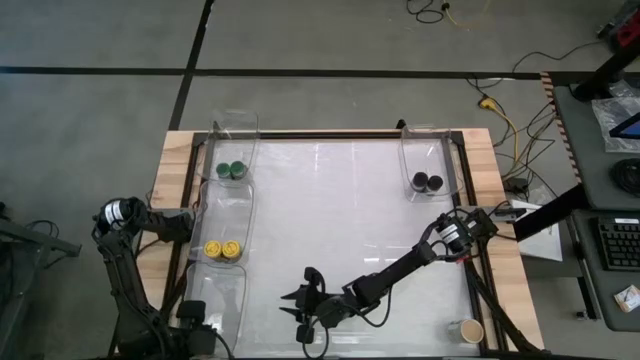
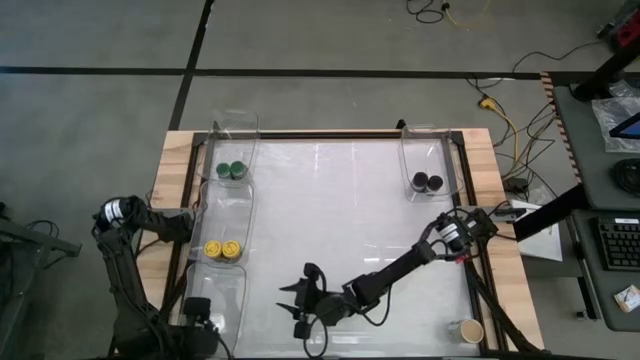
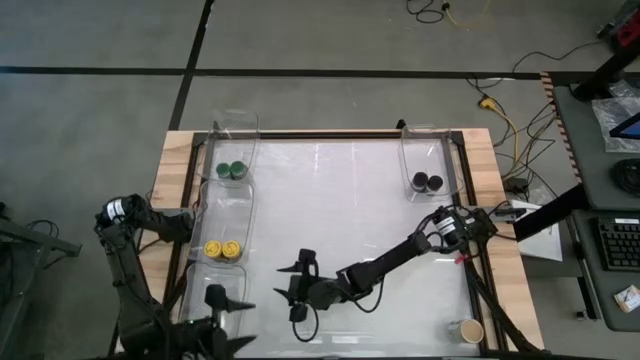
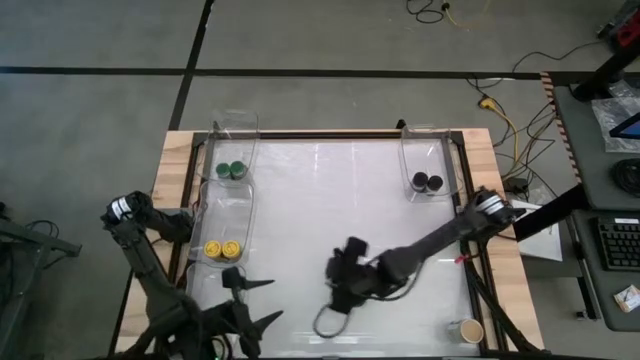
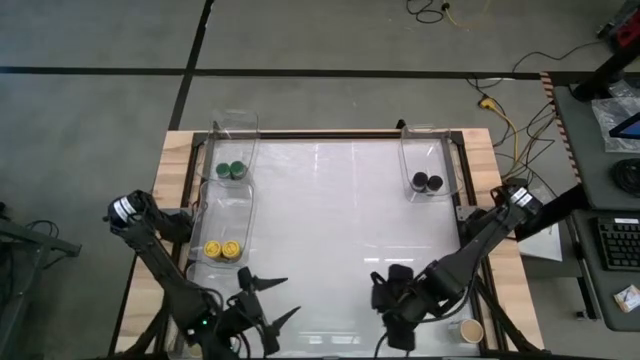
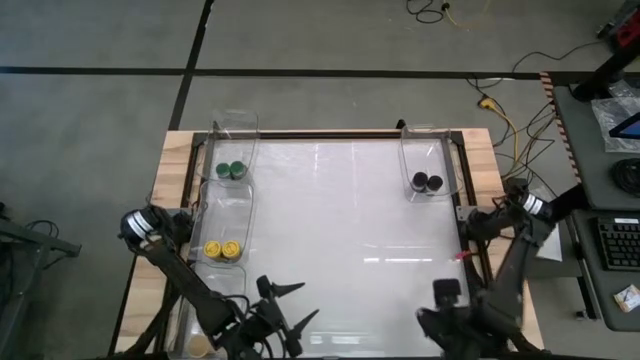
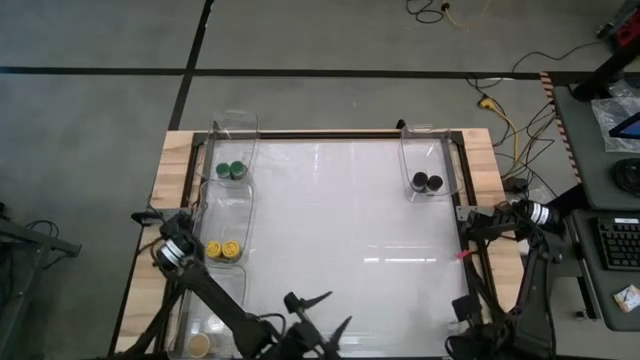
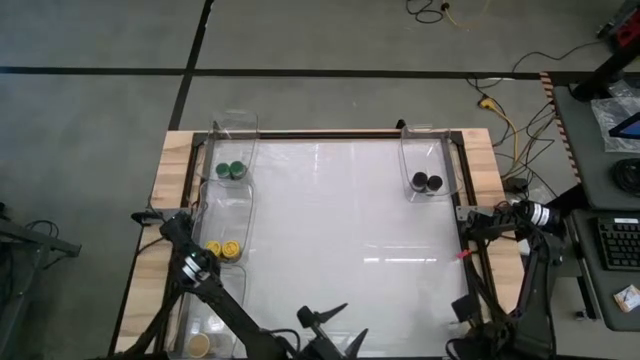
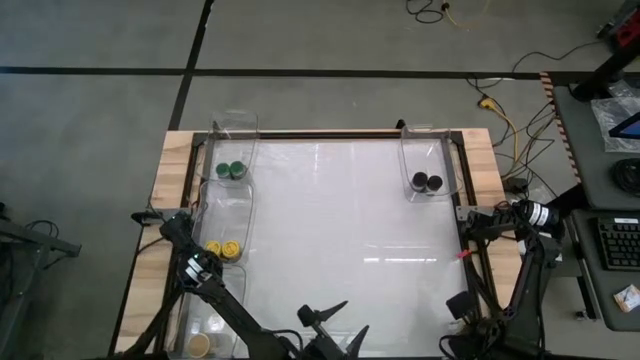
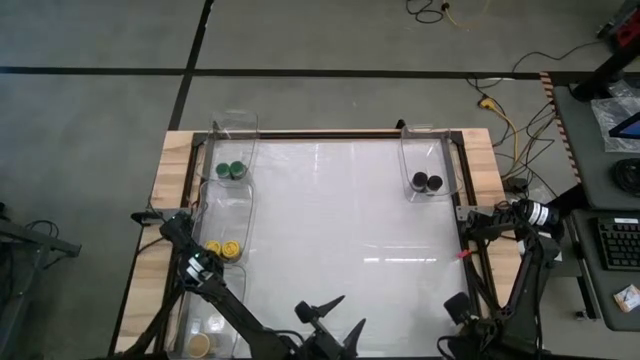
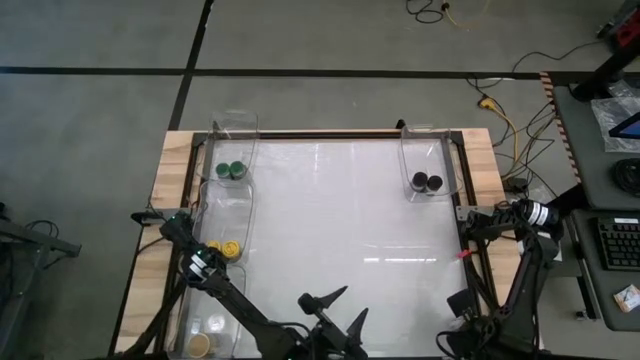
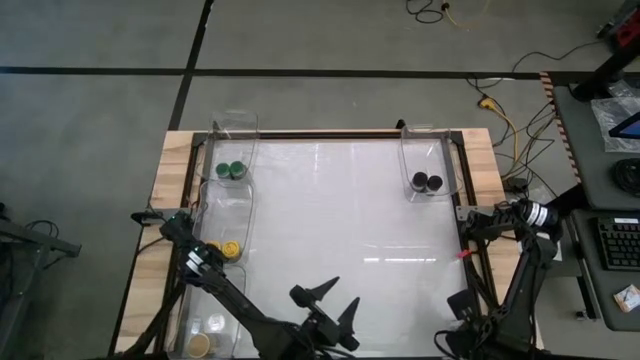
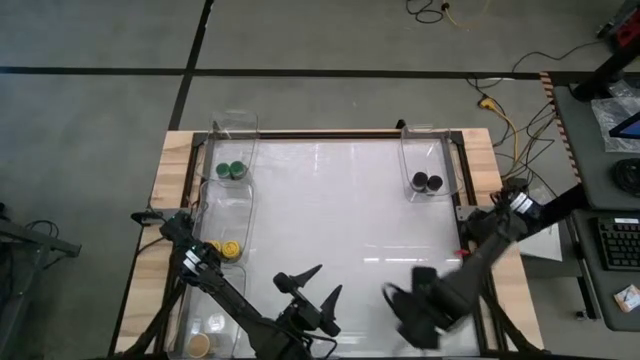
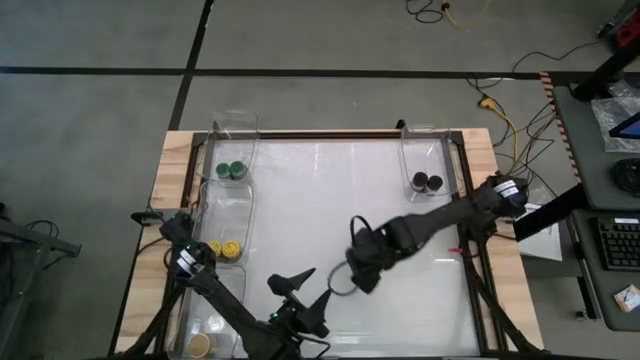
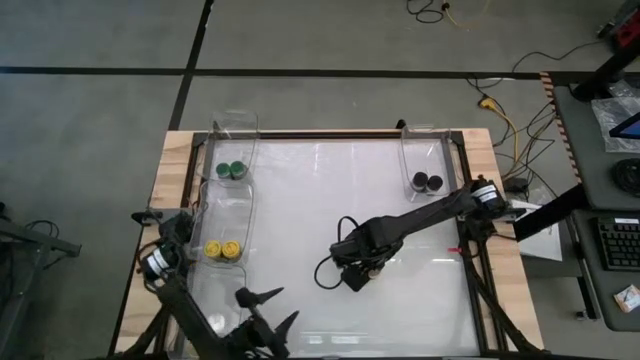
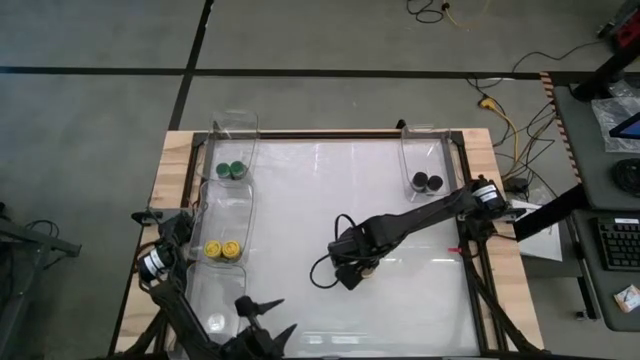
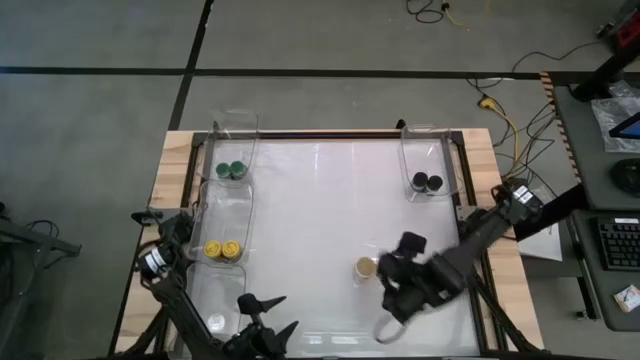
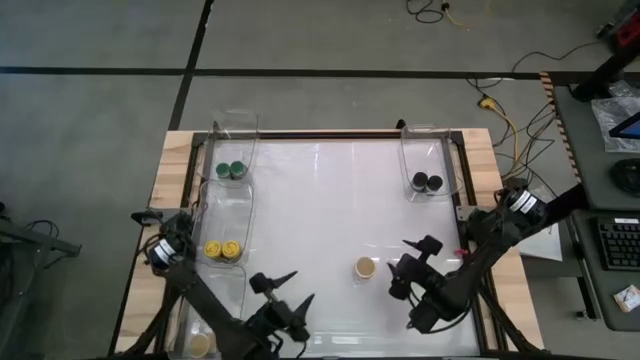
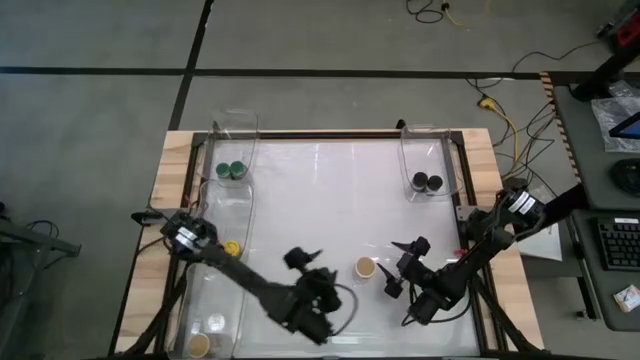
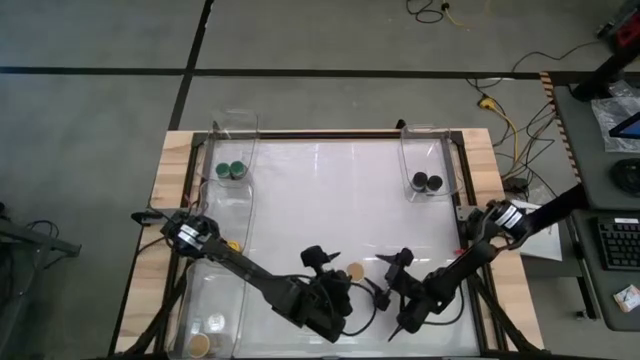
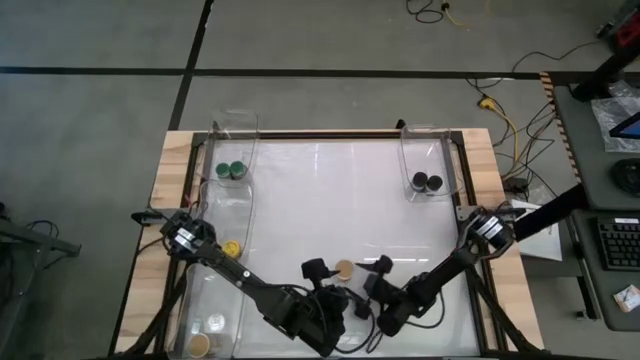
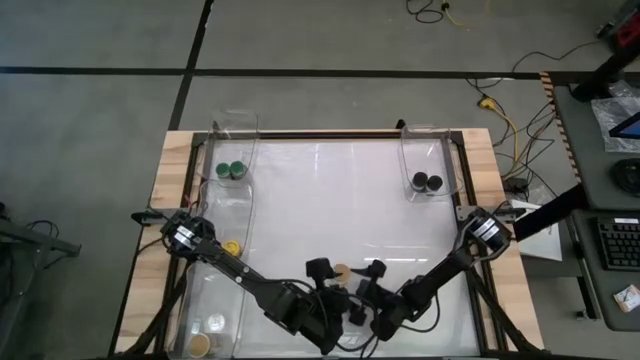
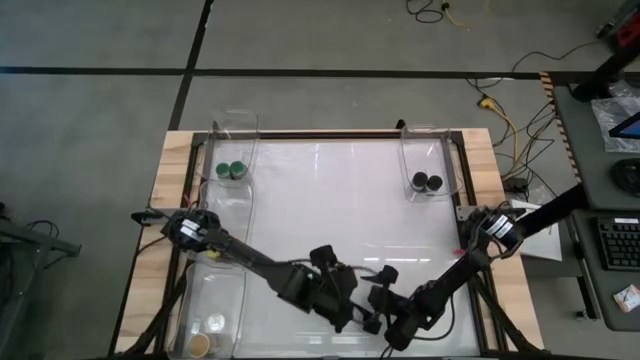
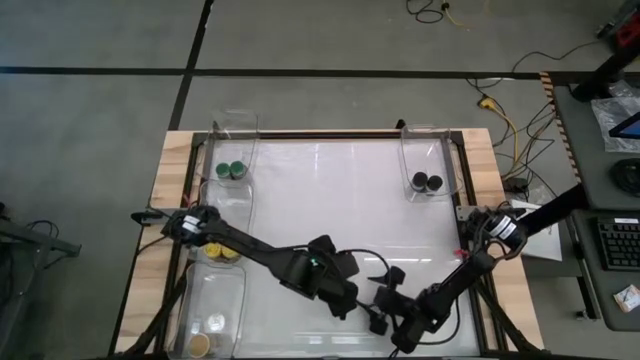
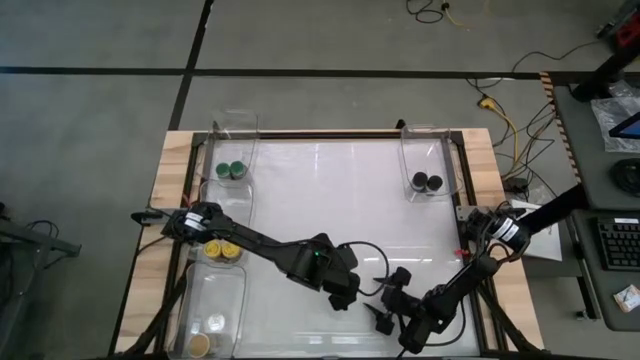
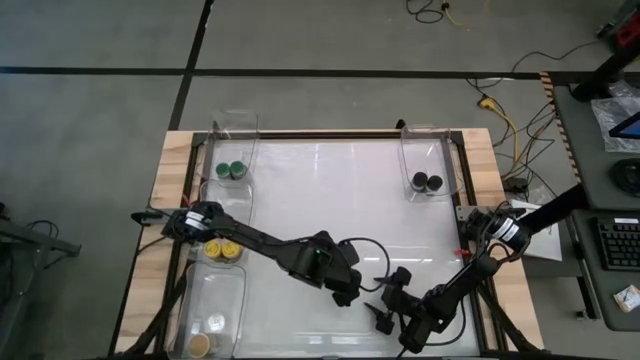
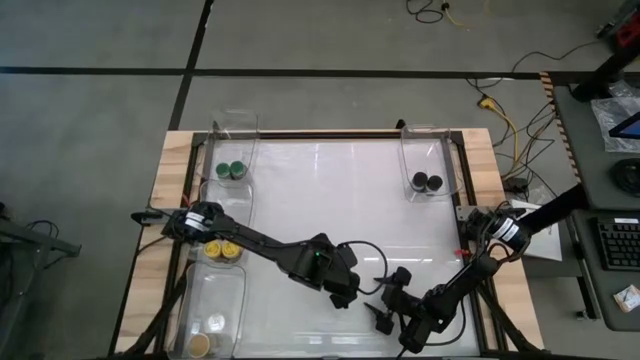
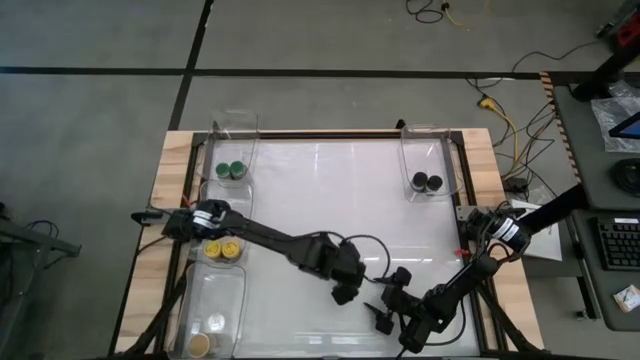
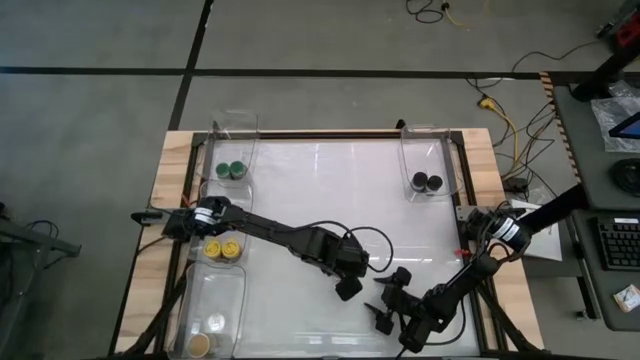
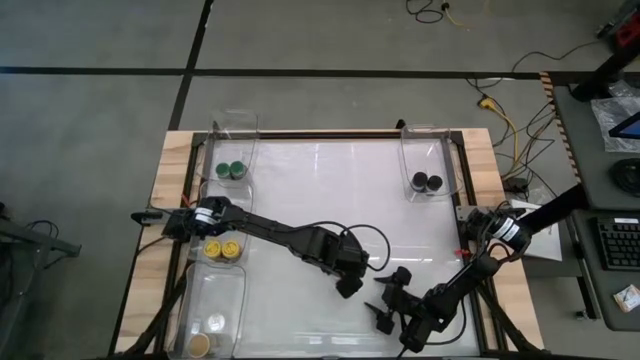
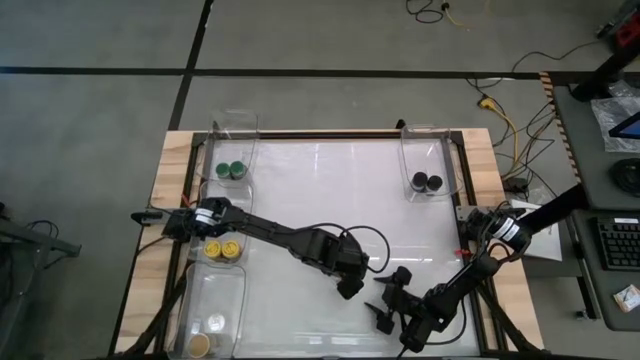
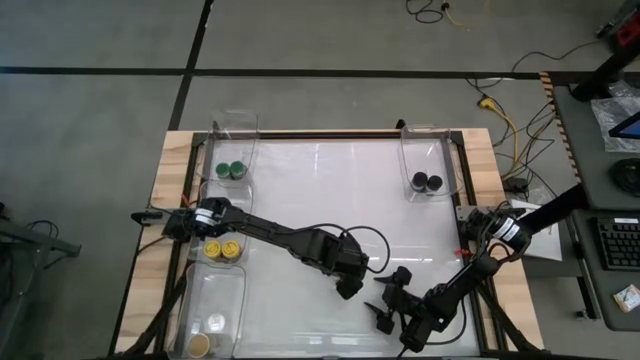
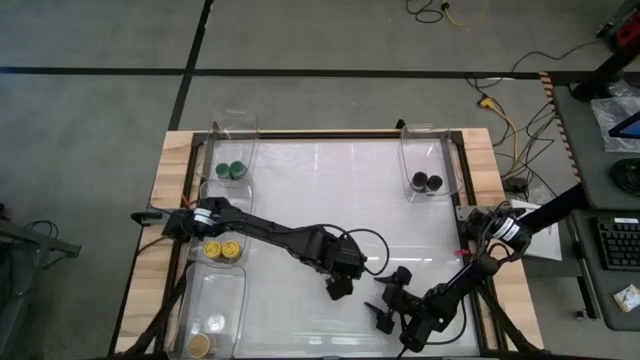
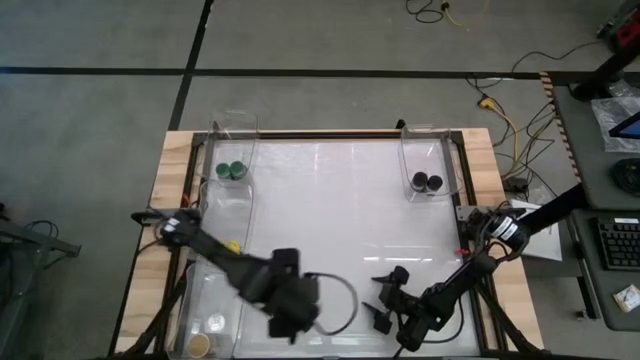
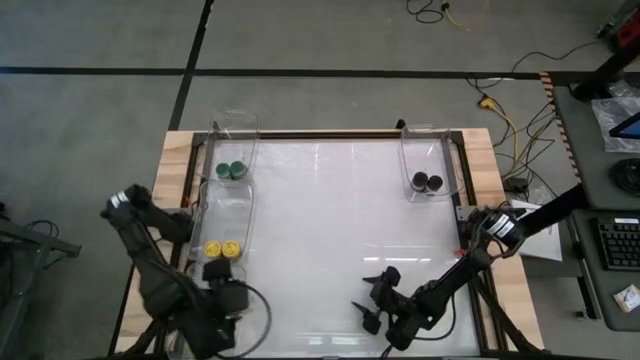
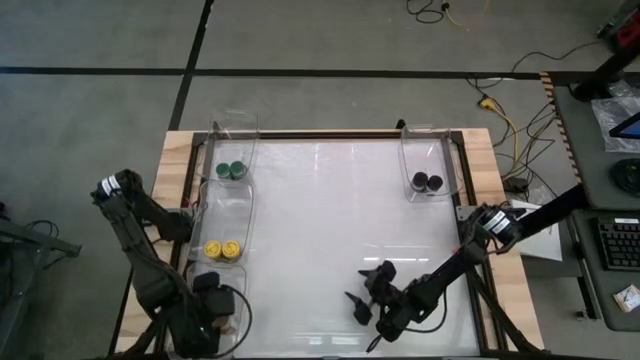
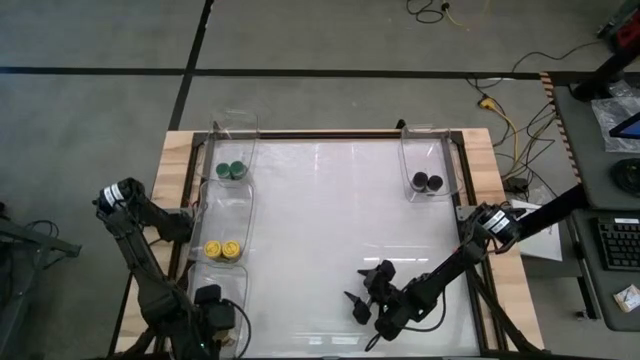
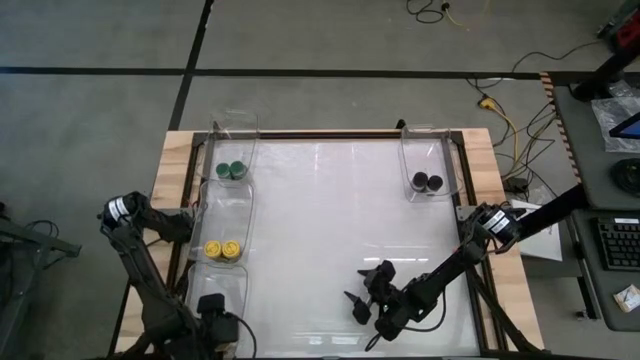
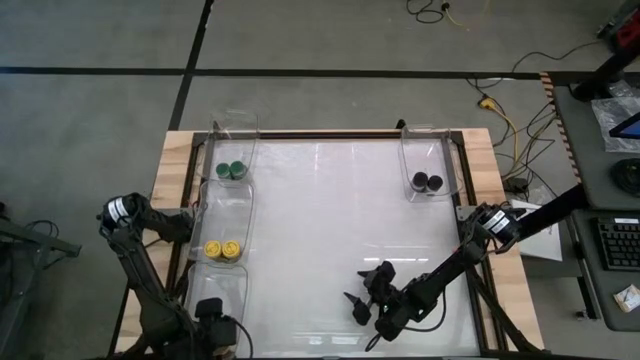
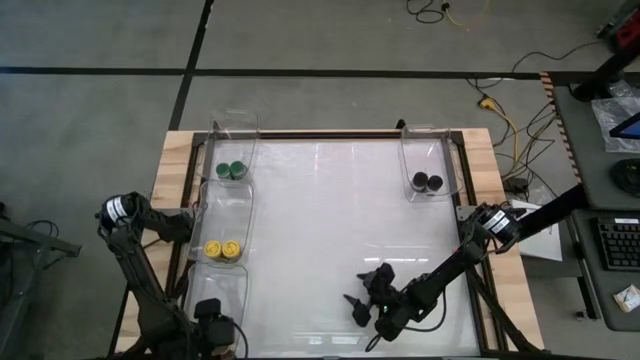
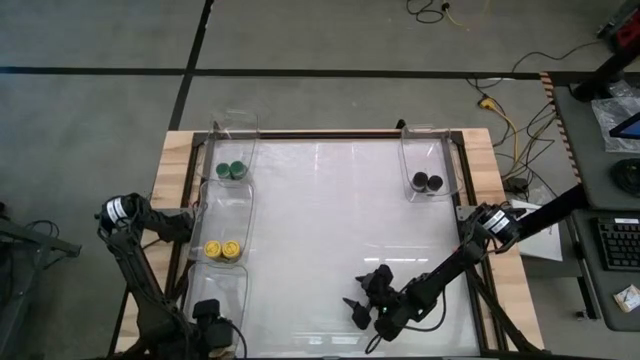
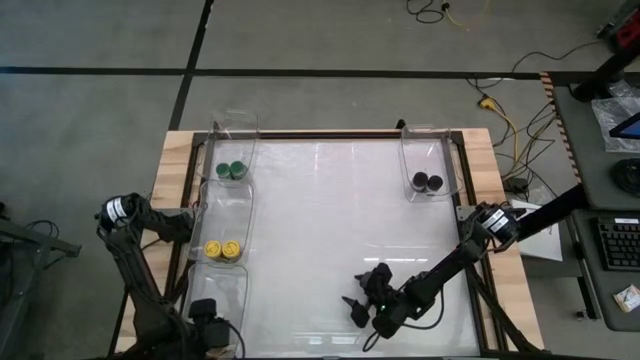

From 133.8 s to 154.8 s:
Task: Sort spices by type
Put the brown spice bottle into the bottom left transparent bin

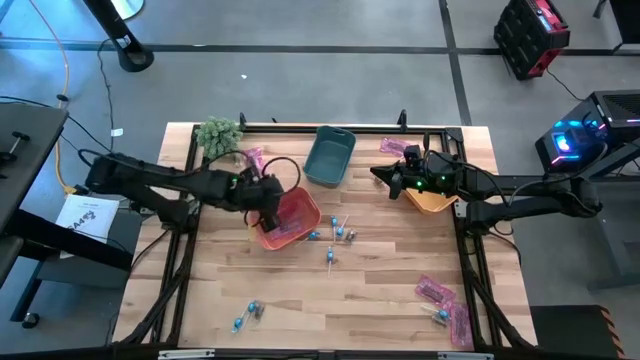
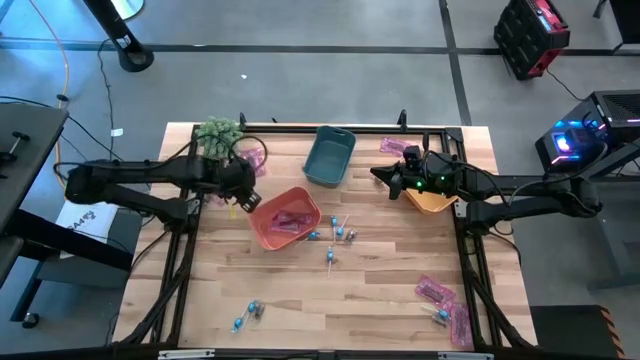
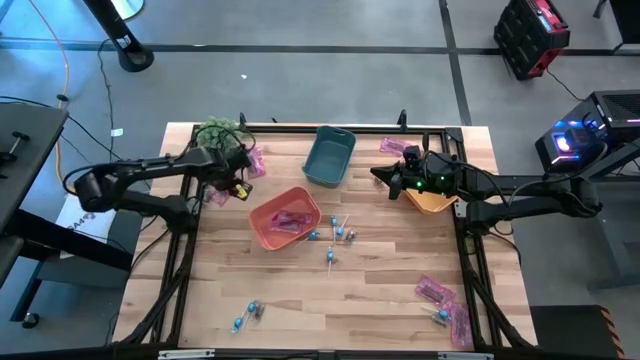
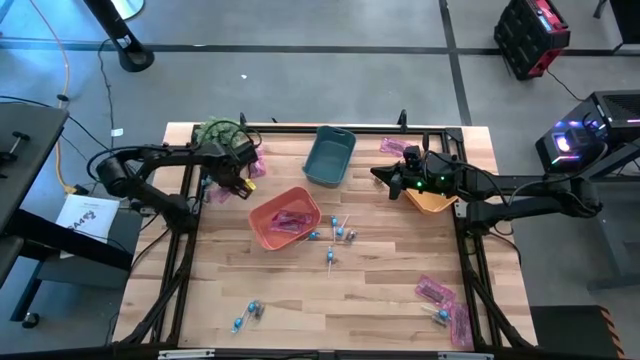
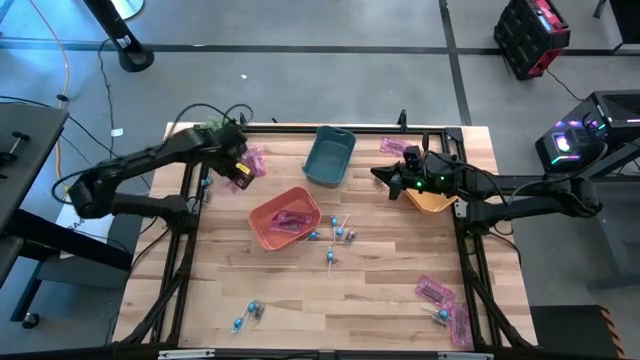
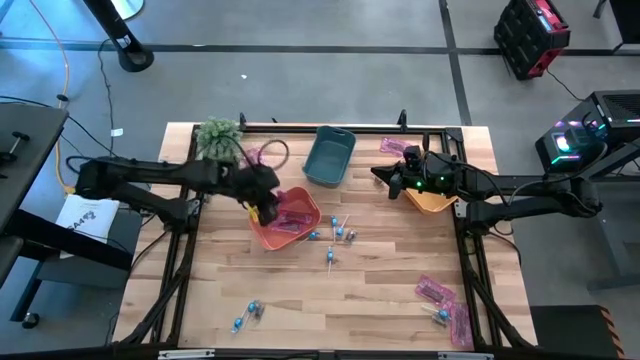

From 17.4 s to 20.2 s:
Task: Sort candy
Put the red candy into the orange bin
